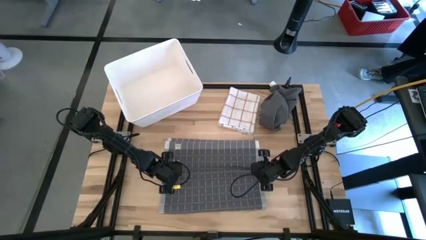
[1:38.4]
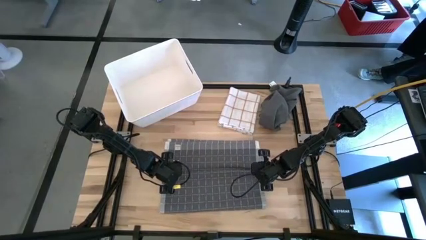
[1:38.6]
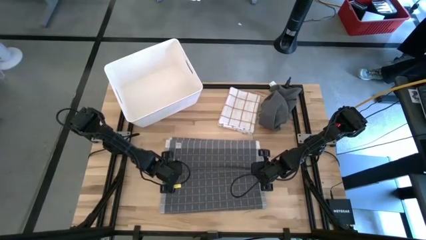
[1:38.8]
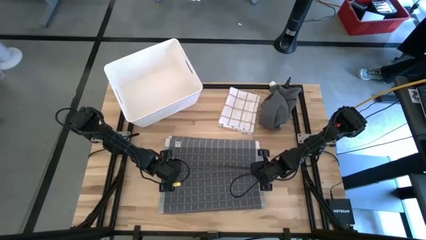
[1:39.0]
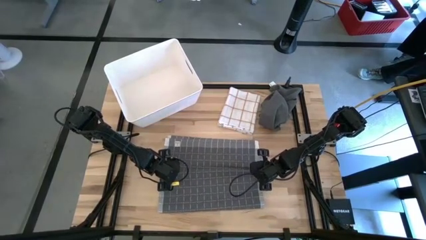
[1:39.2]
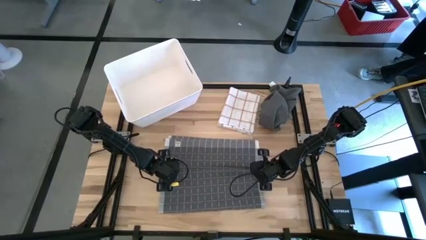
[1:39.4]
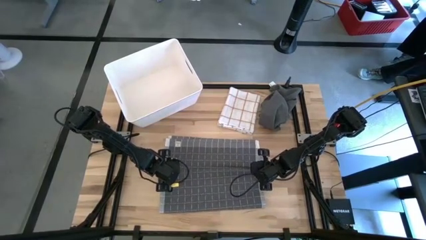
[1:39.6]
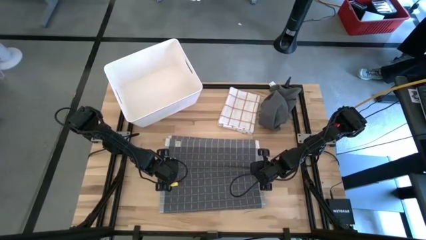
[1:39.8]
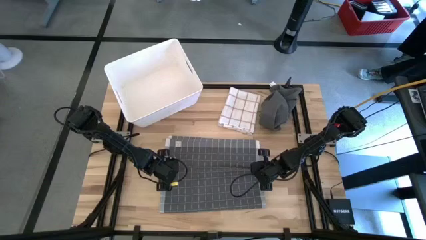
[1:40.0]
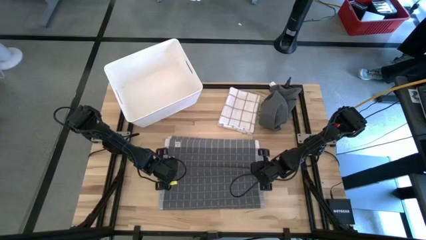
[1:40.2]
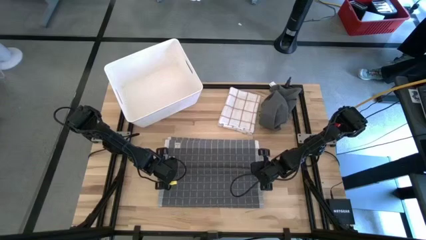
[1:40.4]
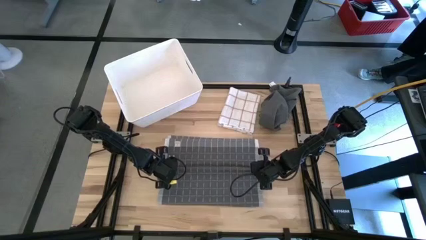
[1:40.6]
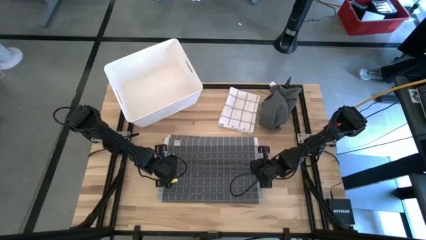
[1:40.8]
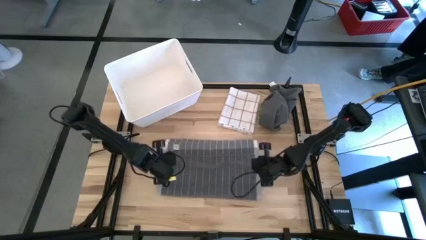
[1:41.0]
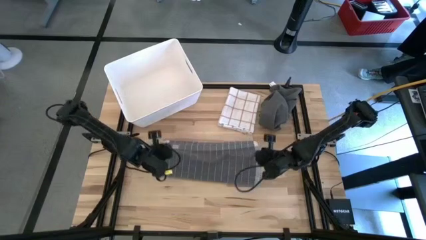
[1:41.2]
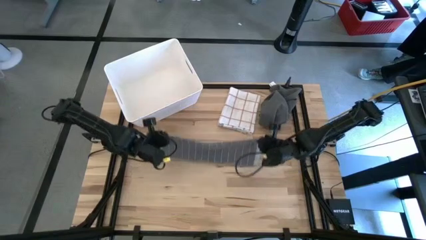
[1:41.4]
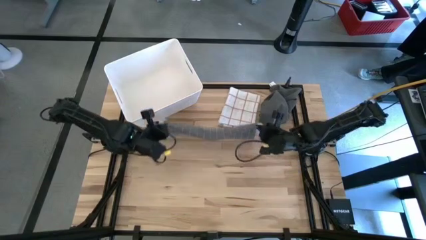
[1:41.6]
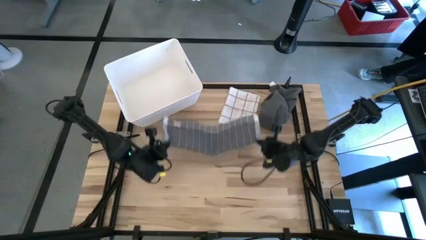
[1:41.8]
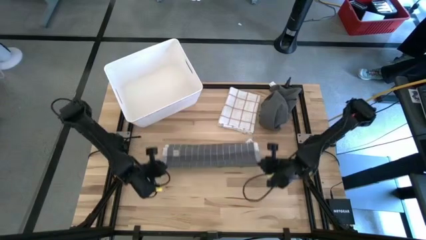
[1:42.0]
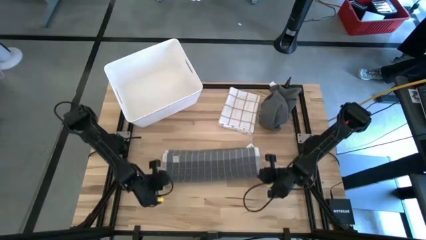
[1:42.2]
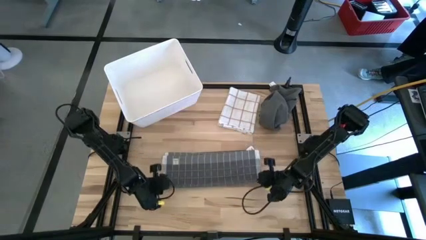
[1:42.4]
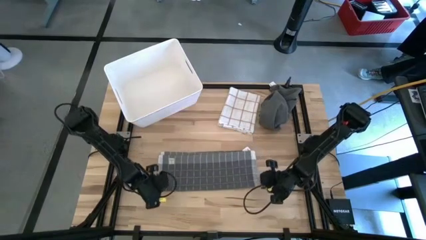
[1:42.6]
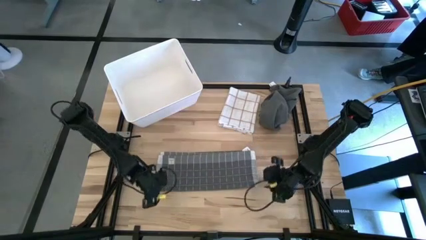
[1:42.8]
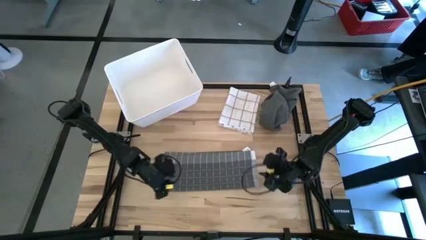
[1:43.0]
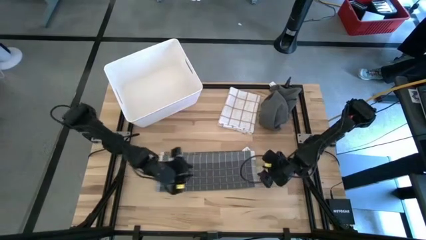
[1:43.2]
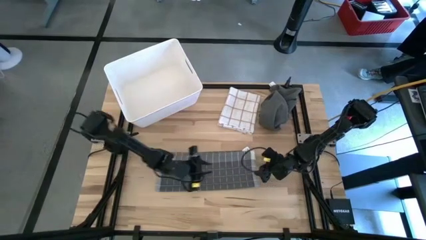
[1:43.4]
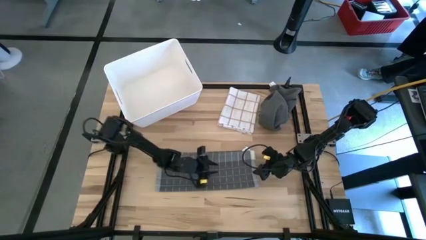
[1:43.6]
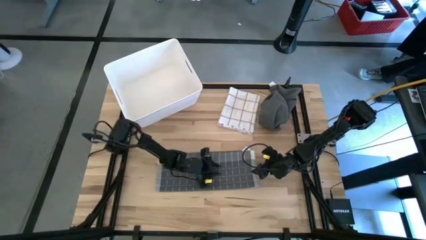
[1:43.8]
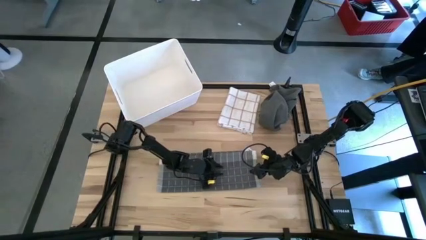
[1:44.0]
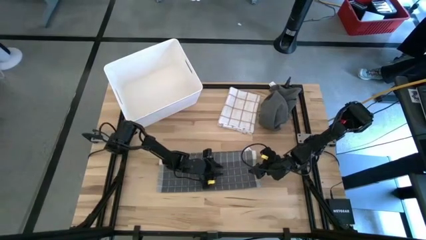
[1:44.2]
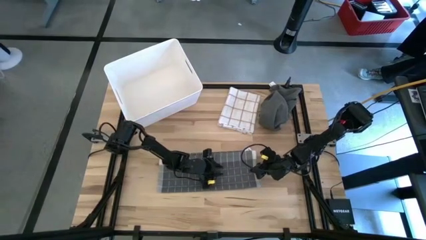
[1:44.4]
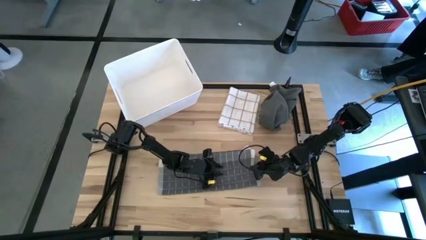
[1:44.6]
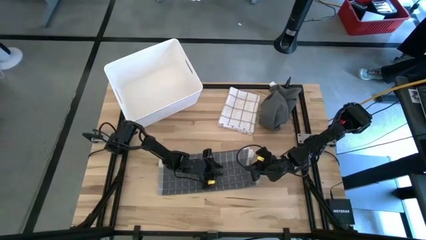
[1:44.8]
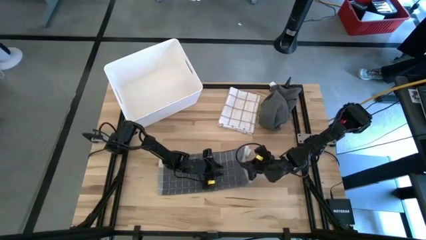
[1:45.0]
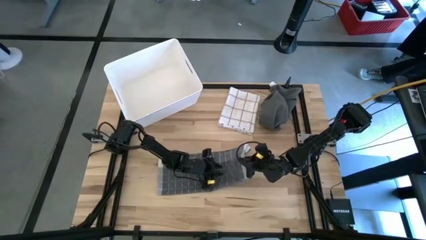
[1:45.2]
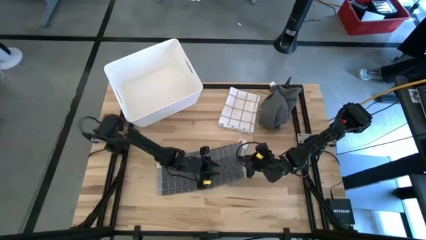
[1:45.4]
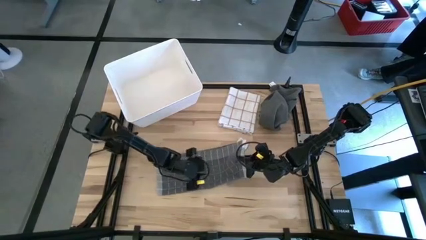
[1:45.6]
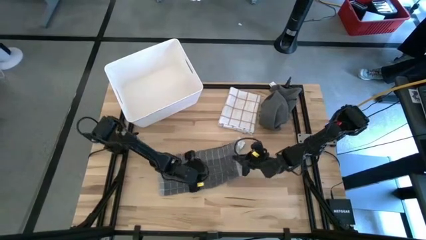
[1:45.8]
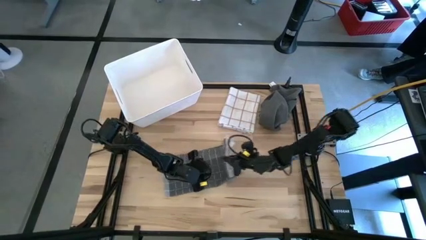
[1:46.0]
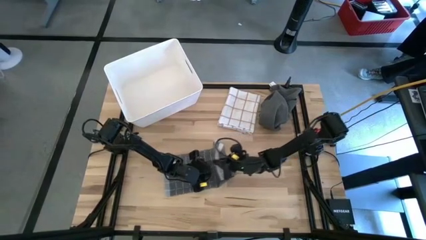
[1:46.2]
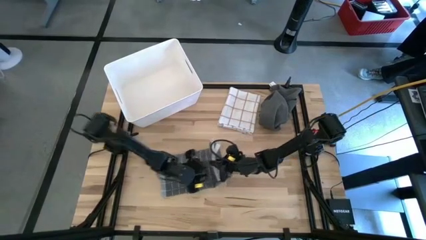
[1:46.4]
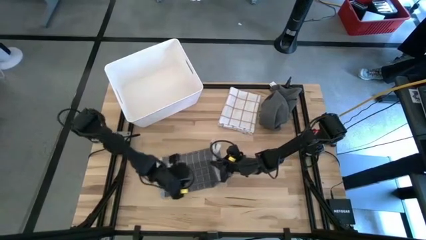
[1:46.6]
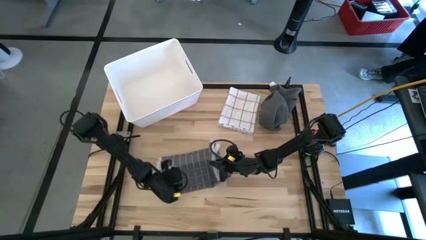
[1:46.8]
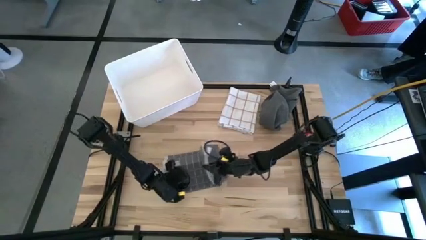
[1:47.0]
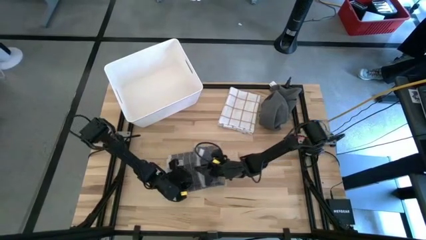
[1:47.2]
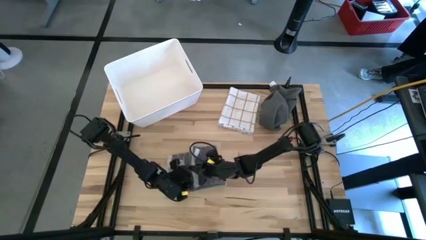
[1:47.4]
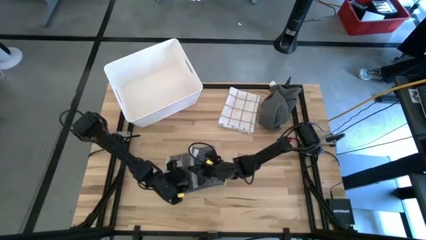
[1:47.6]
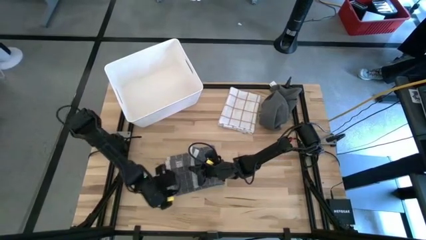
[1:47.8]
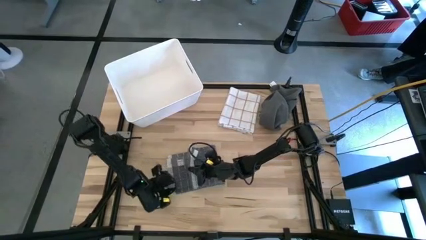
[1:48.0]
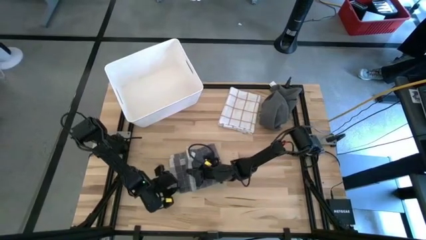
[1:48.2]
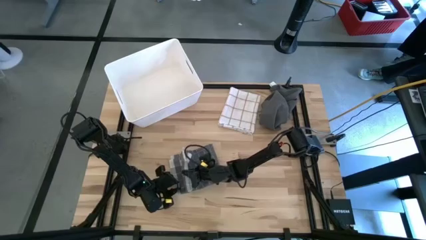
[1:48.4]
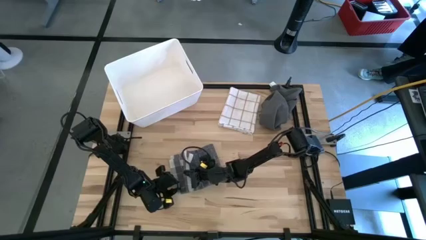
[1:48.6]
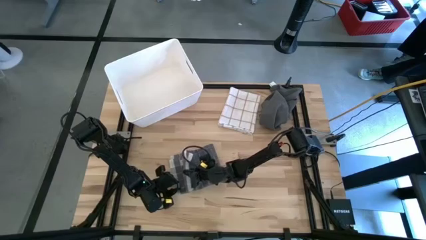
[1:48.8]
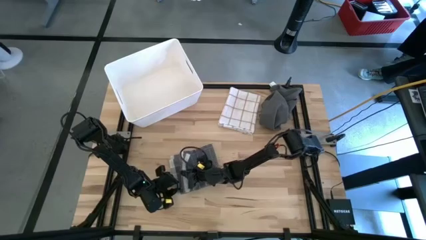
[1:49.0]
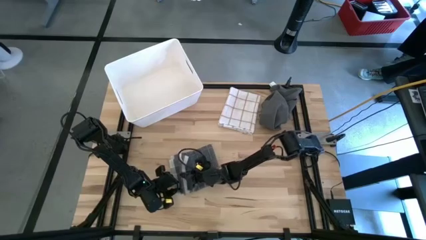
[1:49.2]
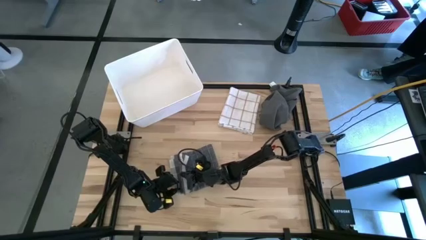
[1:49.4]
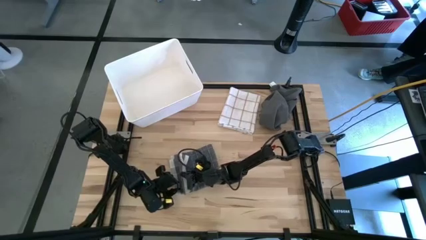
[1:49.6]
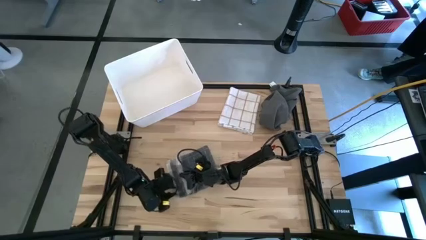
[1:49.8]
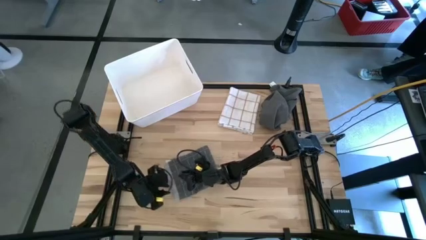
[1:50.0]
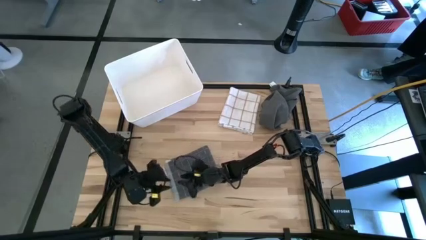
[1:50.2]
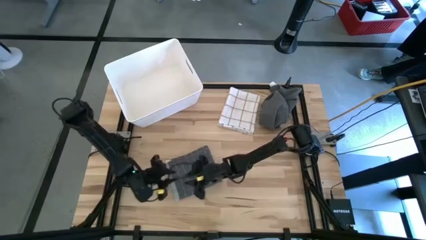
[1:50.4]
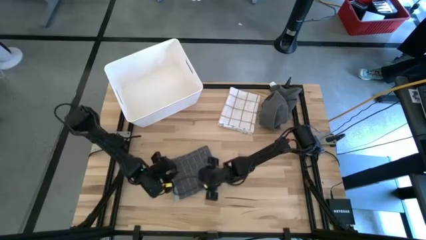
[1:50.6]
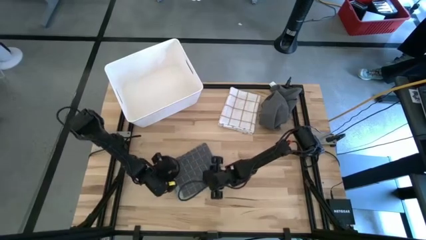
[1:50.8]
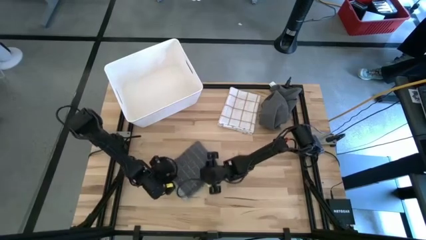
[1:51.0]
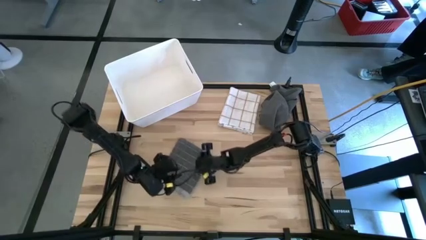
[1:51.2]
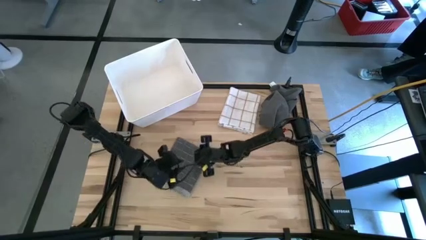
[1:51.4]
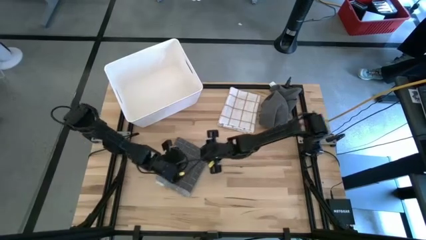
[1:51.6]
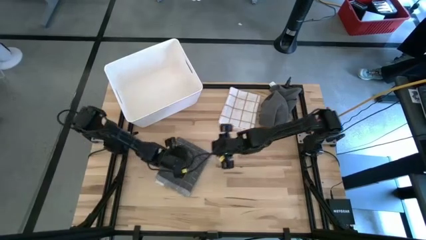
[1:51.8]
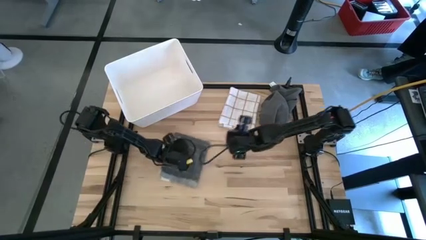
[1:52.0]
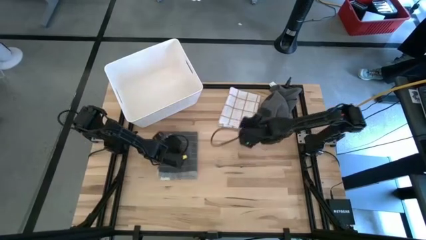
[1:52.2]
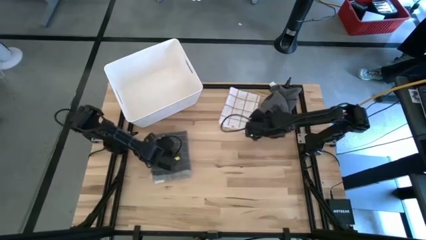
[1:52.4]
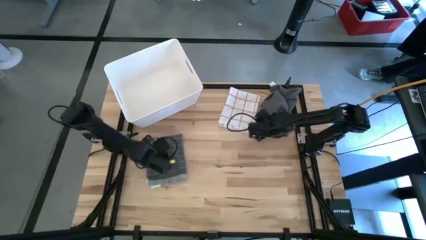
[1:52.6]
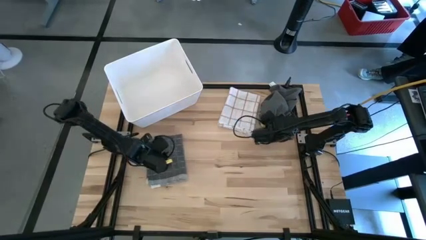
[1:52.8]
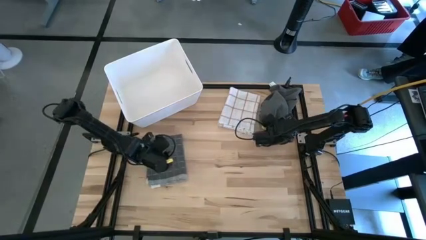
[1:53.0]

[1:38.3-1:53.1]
Task: Fold towel
Fold the gray checkered towel

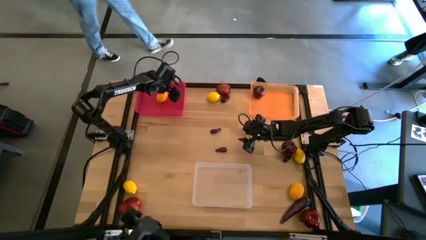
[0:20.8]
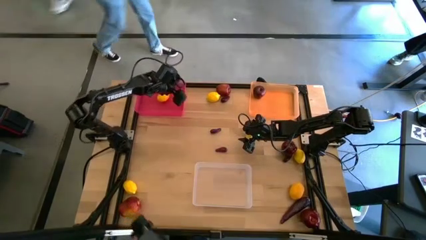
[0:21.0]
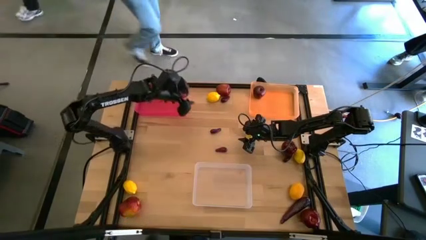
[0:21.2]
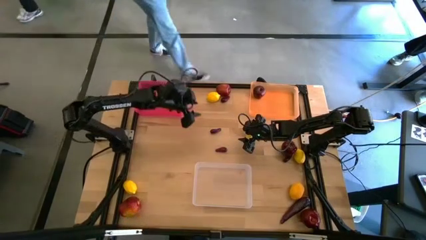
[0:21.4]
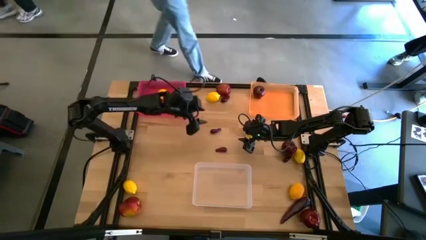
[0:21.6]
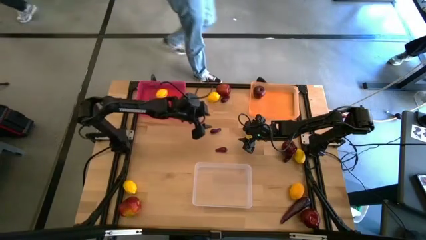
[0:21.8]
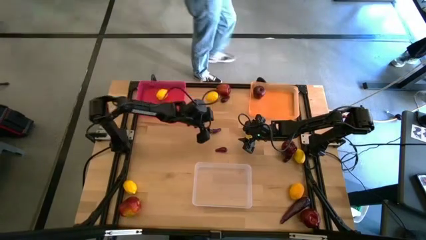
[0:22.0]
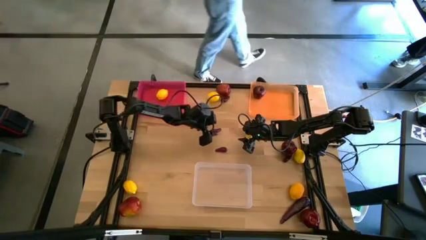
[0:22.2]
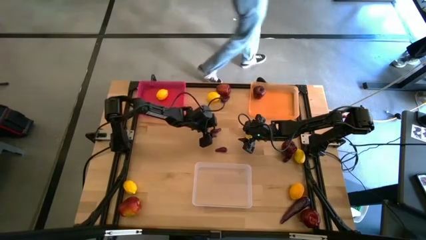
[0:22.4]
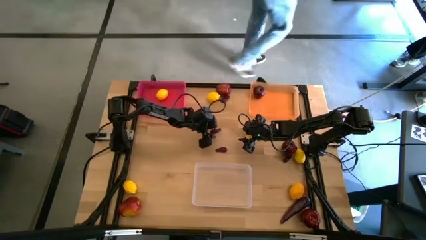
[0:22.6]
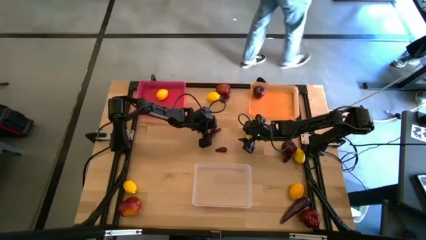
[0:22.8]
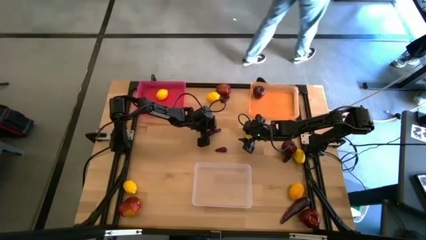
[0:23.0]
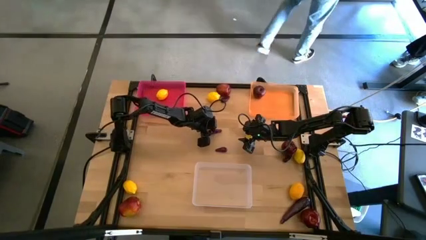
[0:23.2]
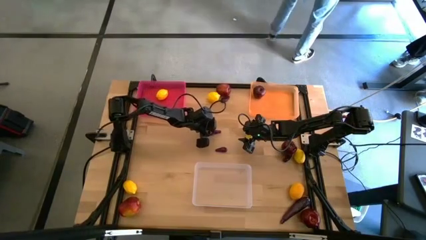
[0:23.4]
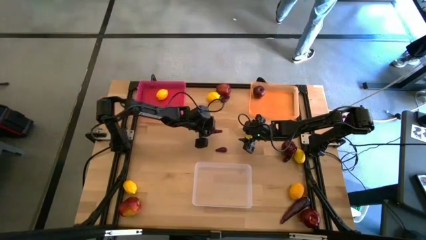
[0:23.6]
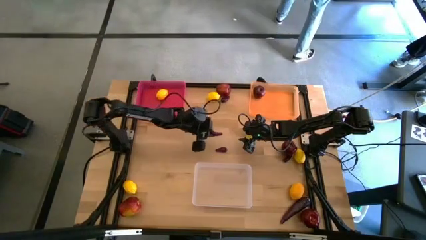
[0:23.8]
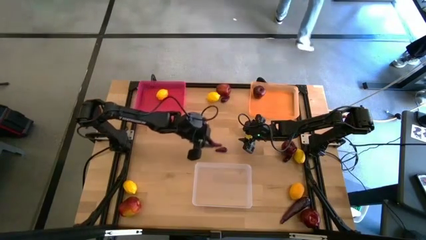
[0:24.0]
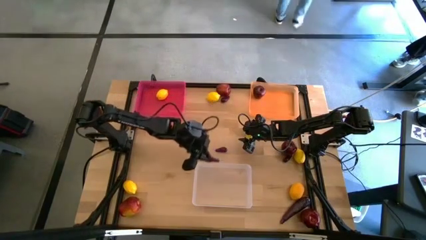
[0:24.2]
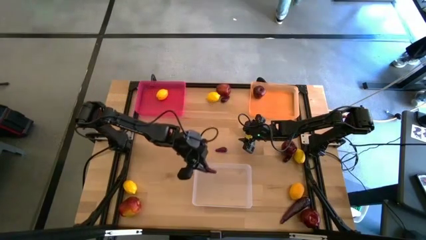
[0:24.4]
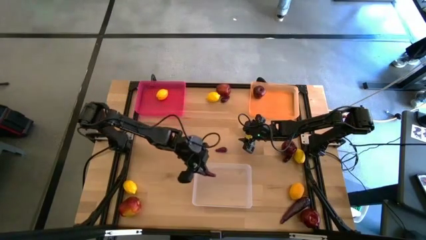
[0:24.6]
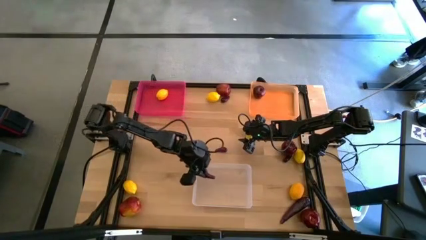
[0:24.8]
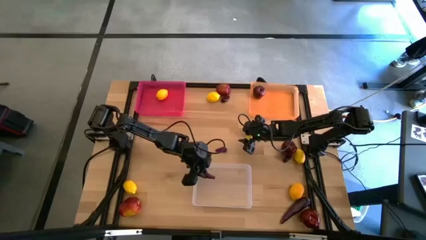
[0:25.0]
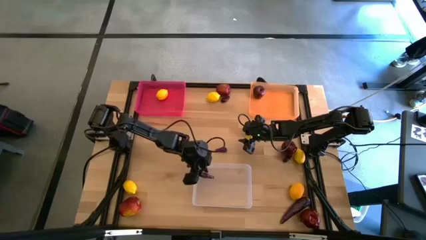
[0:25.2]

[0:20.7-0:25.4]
Task: Sort produce into baskets
Put the eggplant into the transparent bin
